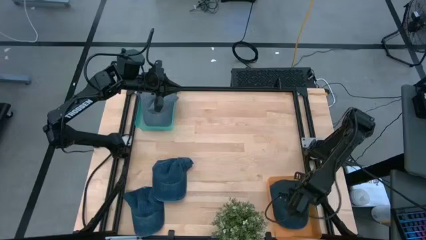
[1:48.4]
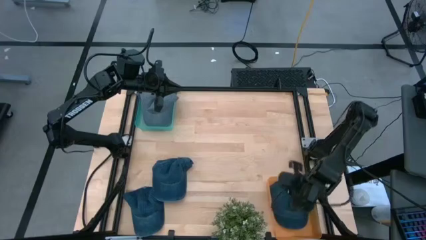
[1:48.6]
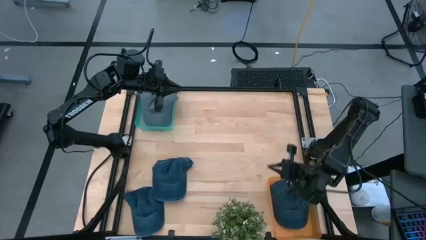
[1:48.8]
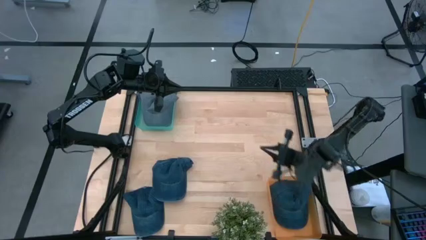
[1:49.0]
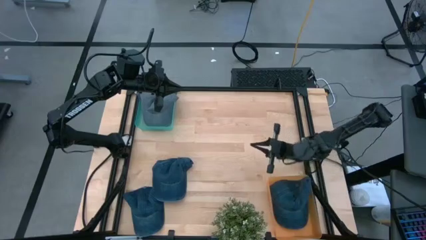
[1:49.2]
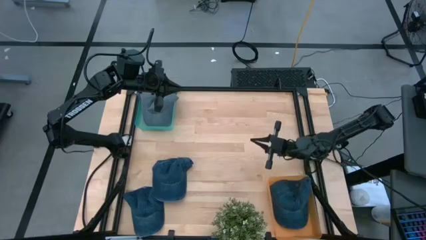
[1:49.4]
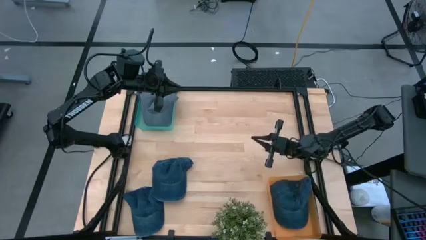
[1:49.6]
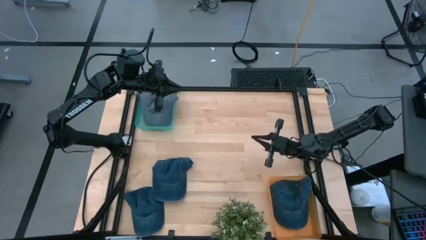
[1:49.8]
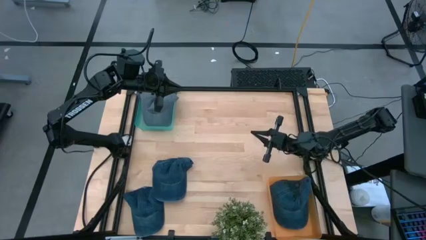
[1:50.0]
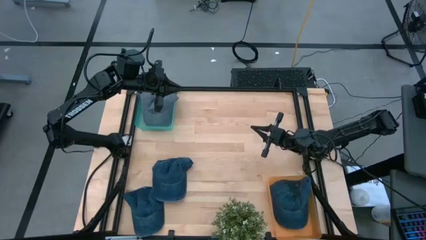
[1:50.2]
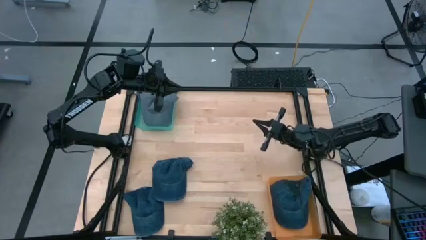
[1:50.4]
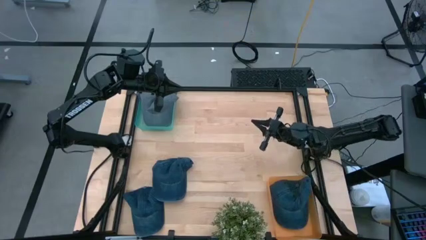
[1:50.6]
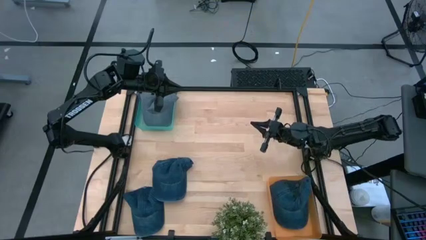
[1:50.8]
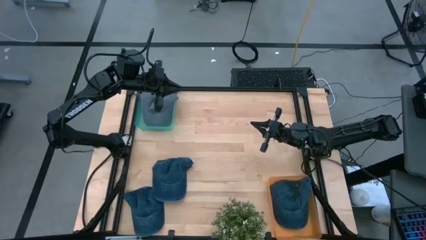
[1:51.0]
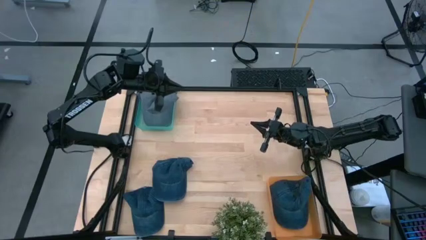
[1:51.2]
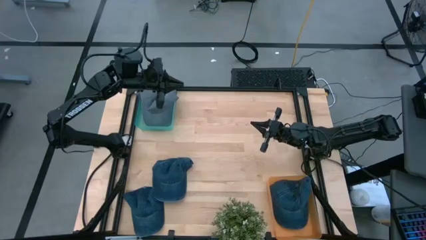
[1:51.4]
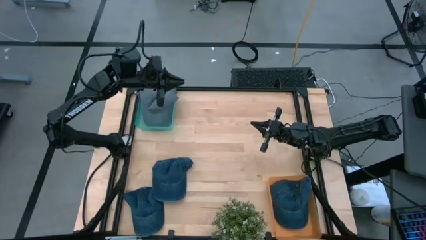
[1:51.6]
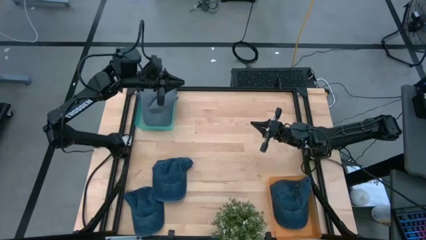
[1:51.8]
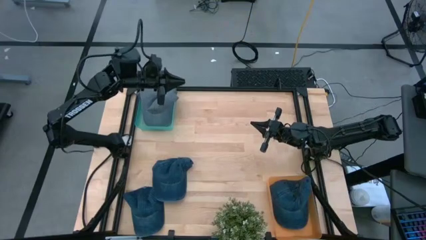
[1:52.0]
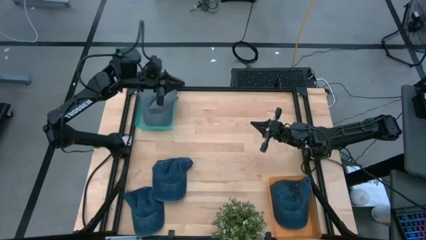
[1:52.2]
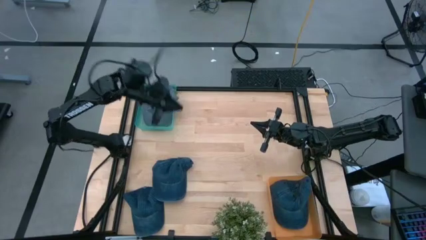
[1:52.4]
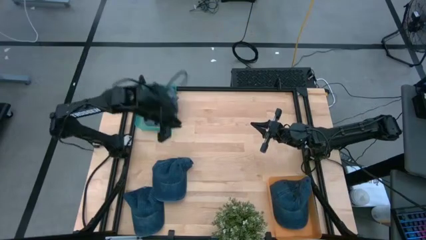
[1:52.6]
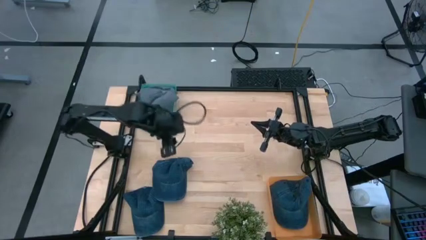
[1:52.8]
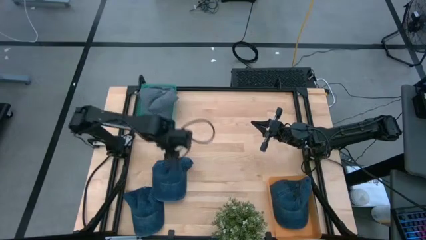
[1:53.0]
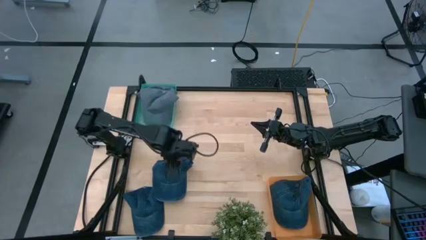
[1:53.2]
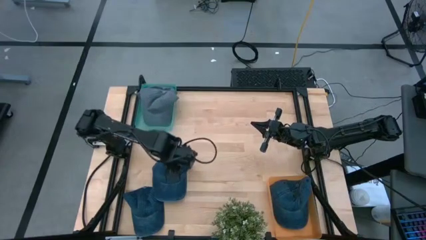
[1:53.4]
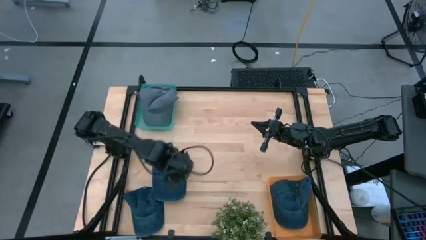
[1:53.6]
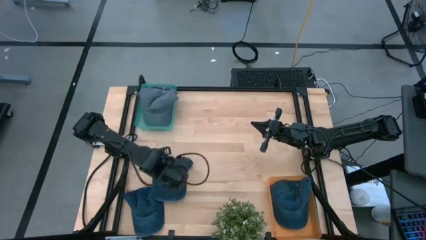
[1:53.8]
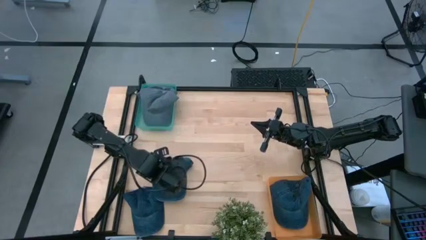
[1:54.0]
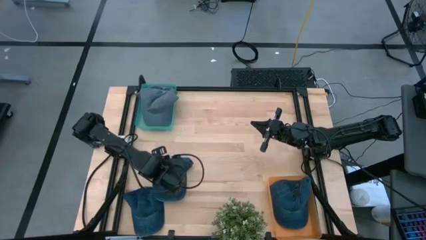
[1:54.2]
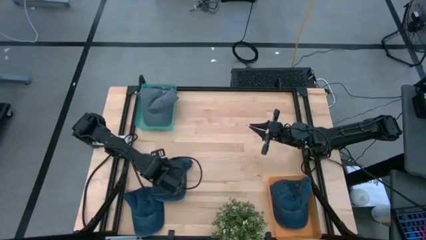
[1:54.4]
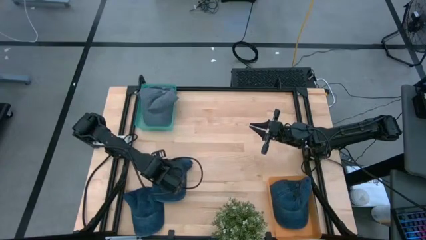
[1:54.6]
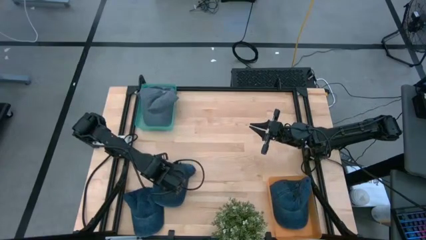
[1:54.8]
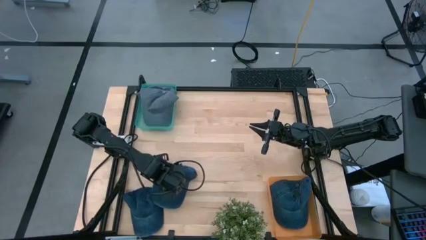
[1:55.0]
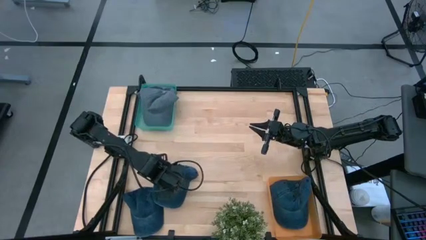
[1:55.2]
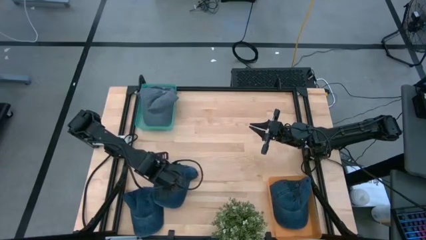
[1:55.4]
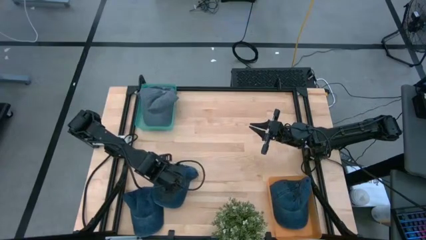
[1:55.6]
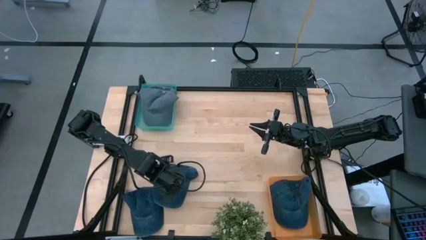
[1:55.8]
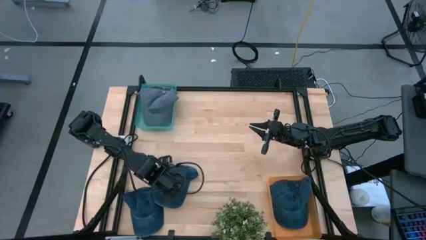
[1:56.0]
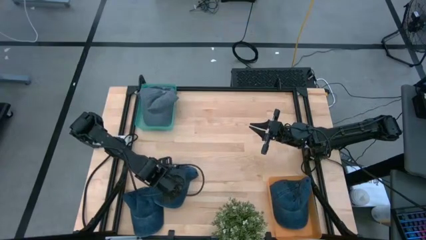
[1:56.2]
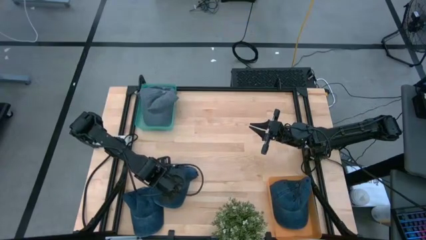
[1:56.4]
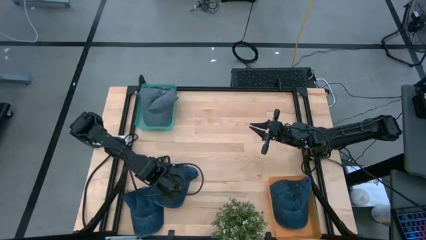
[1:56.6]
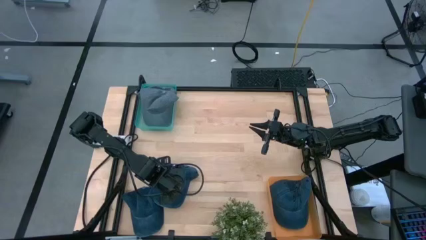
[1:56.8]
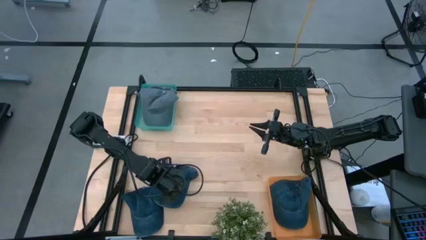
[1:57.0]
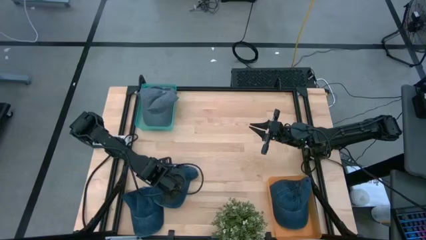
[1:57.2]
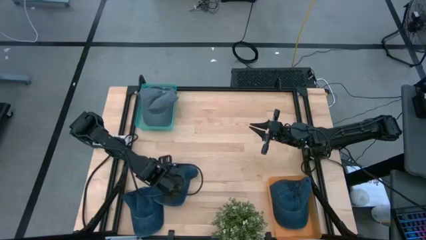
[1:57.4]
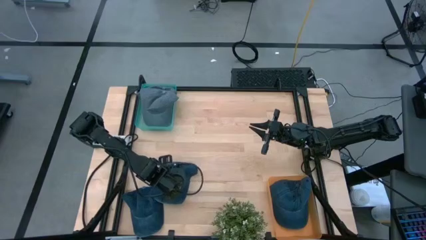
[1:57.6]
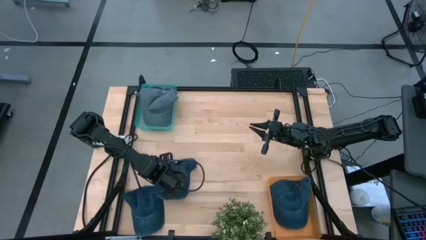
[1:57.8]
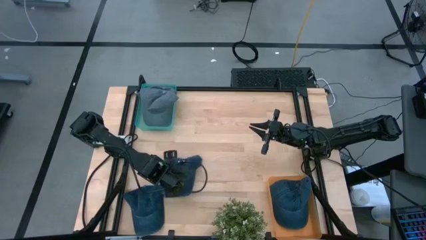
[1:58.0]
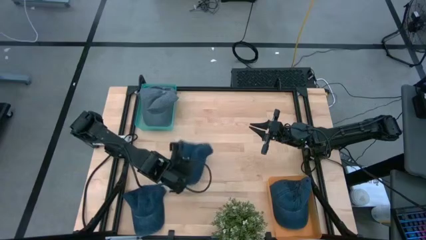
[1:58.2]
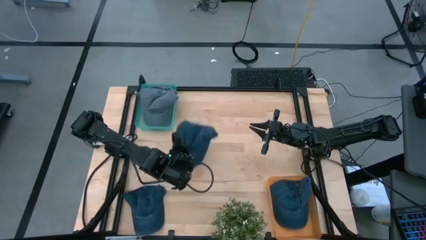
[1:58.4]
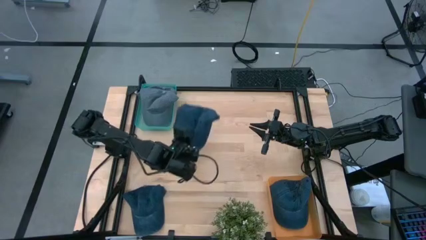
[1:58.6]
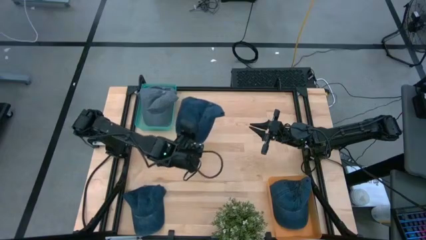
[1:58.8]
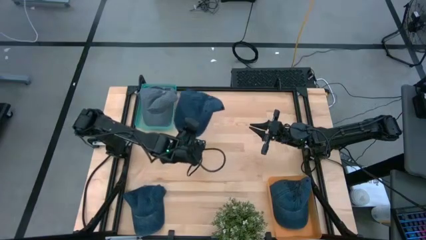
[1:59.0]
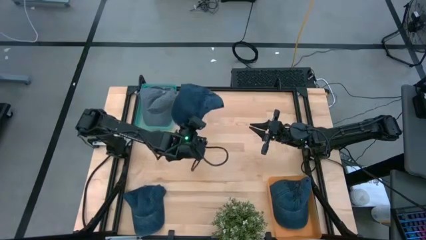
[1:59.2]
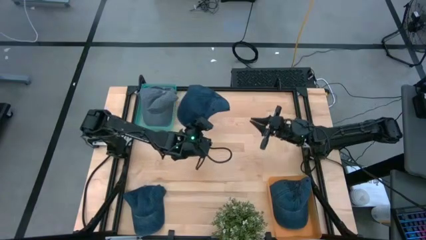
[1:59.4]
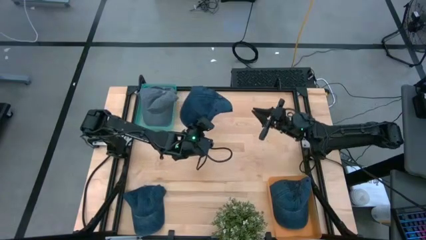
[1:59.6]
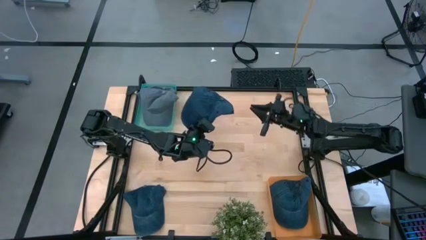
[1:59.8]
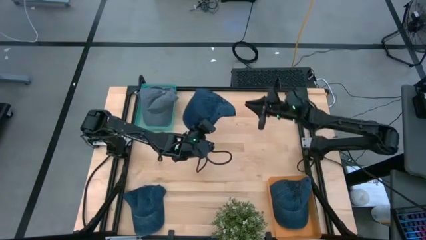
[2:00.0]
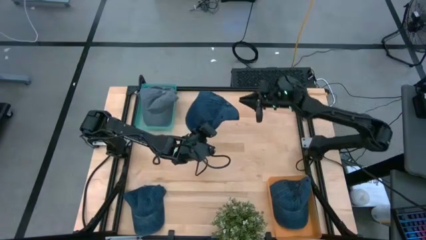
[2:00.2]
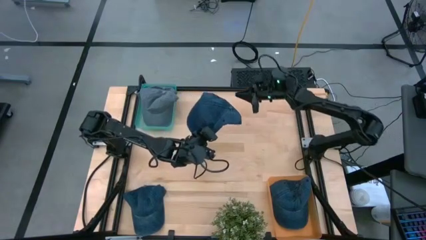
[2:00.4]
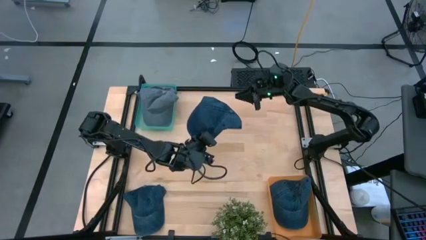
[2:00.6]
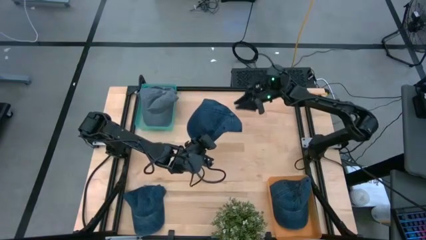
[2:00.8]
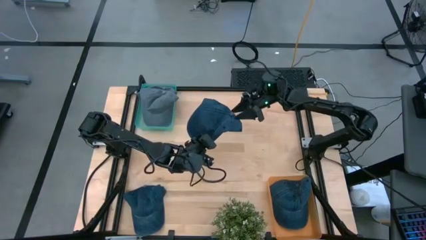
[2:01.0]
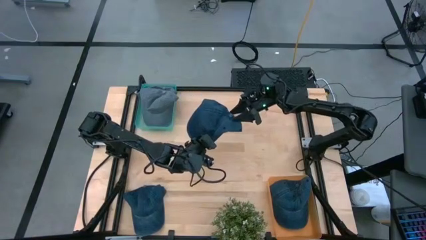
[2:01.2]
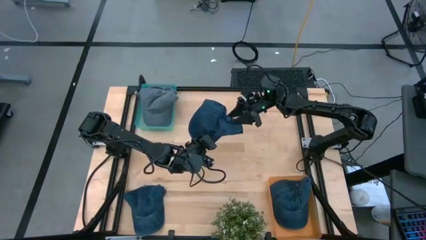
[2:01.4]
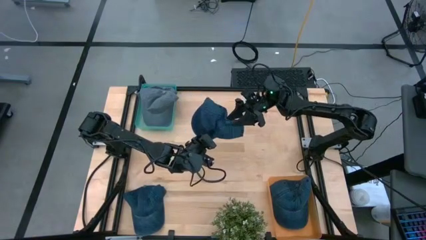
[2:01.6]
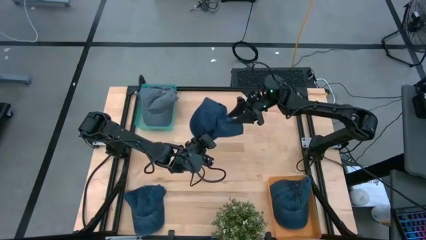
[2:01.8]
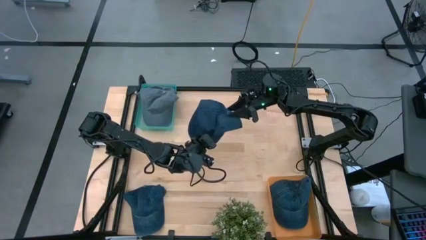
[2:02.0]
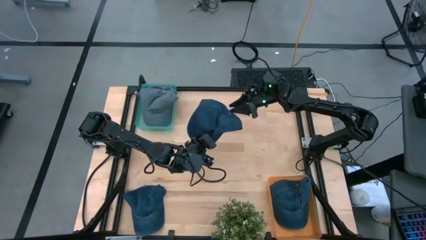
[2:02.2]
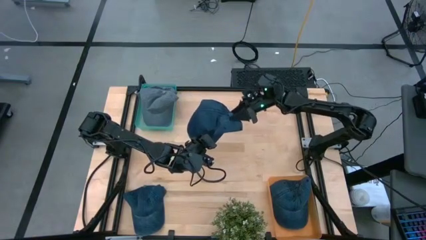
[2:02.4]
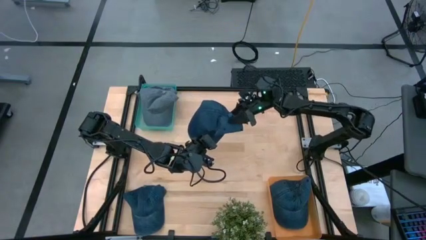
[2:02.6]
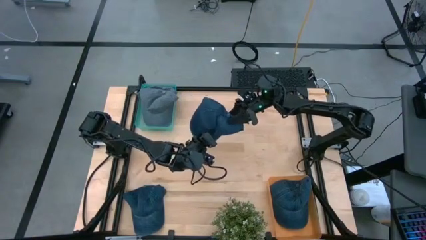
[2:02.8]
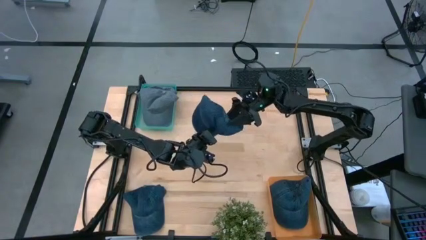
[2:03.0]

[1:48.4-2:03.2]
Task: Pick & Place hat
Put the top blue cap into the orange bin
